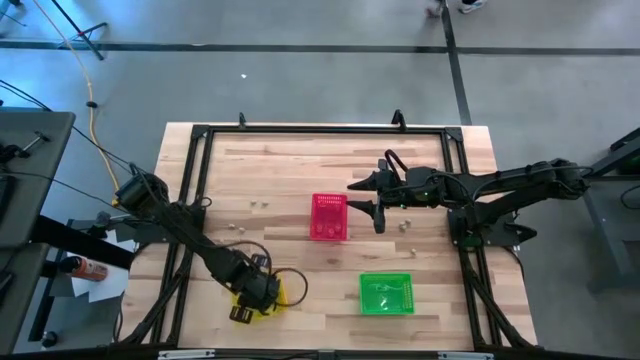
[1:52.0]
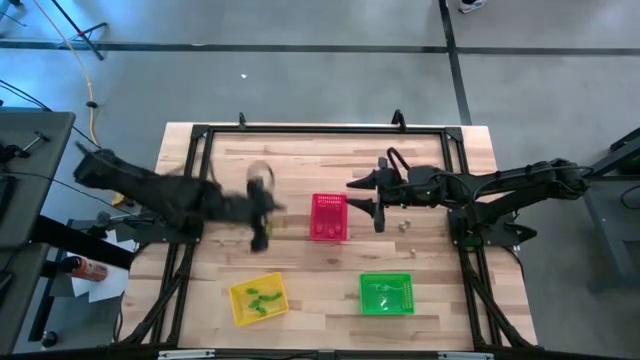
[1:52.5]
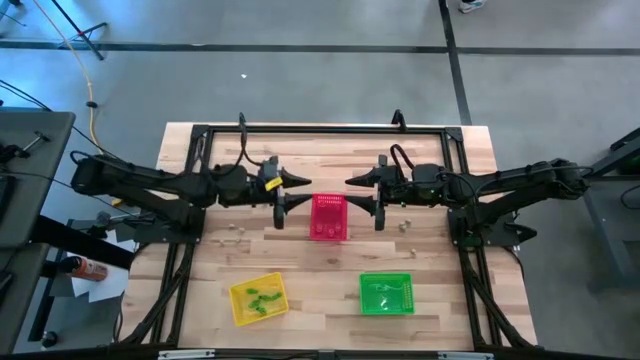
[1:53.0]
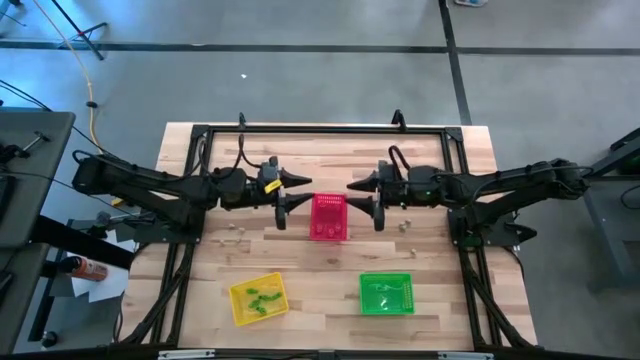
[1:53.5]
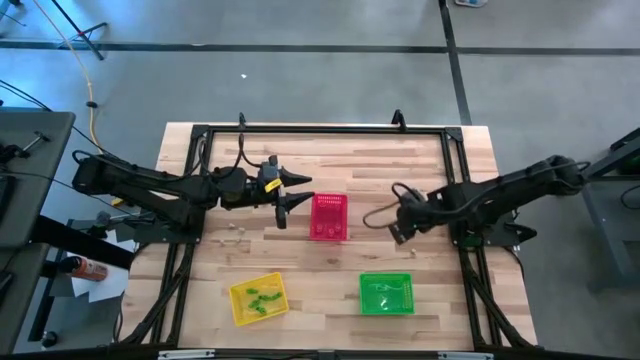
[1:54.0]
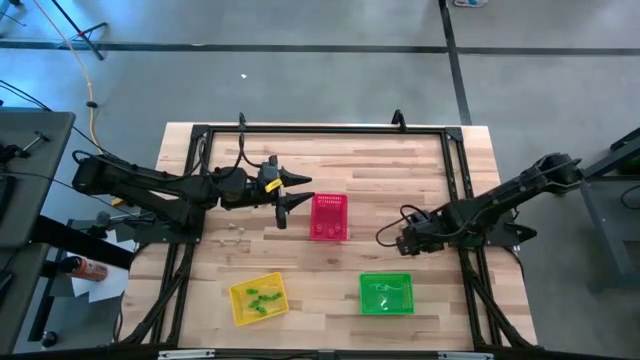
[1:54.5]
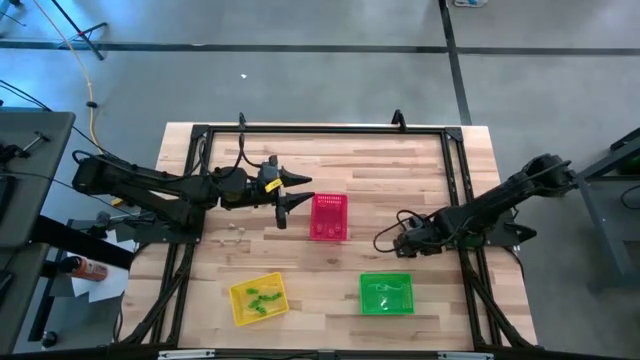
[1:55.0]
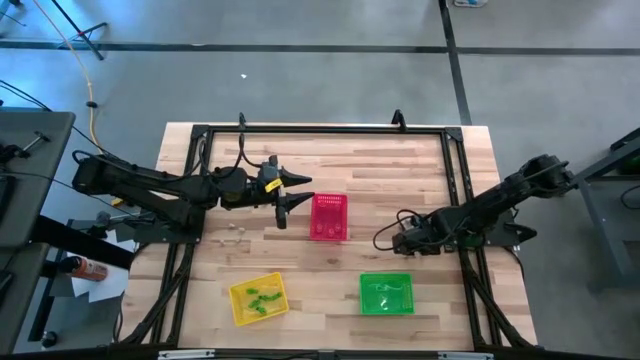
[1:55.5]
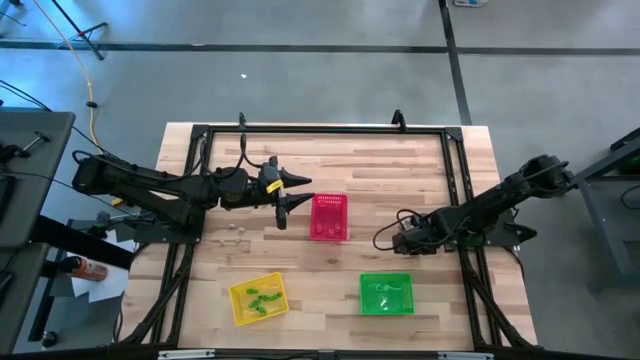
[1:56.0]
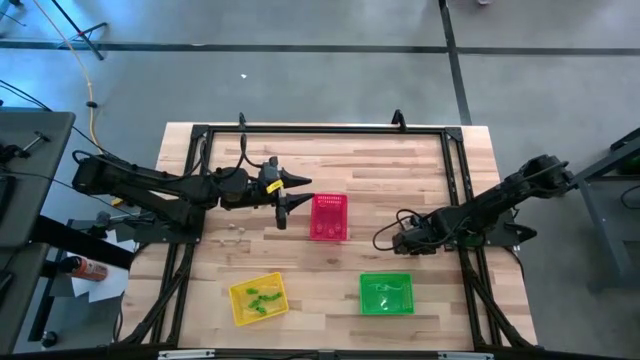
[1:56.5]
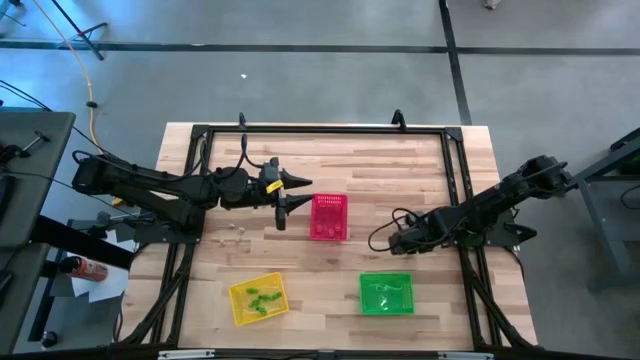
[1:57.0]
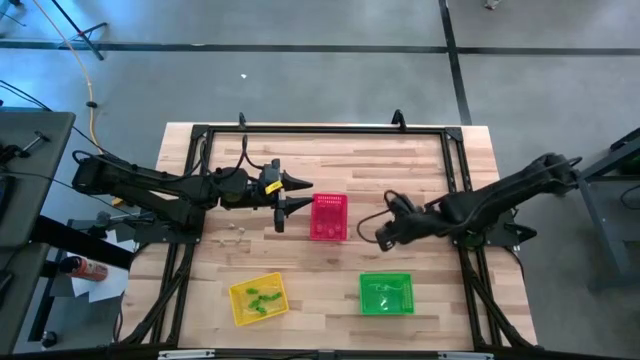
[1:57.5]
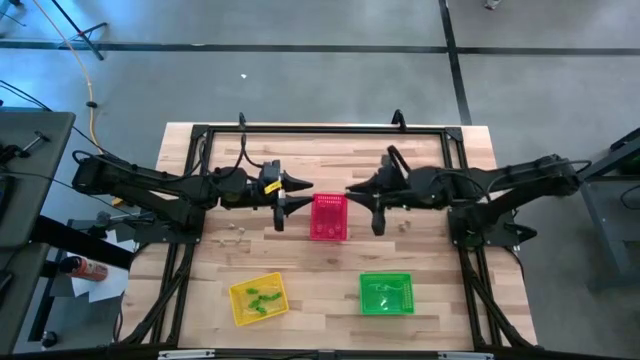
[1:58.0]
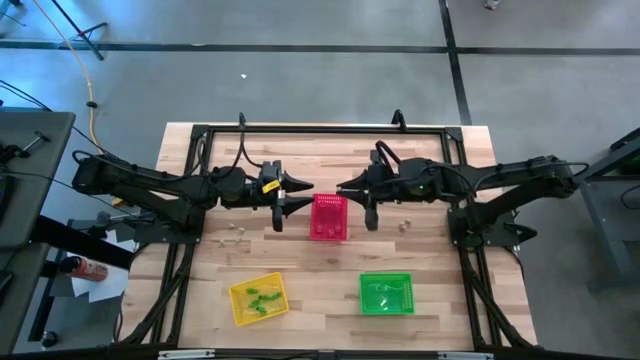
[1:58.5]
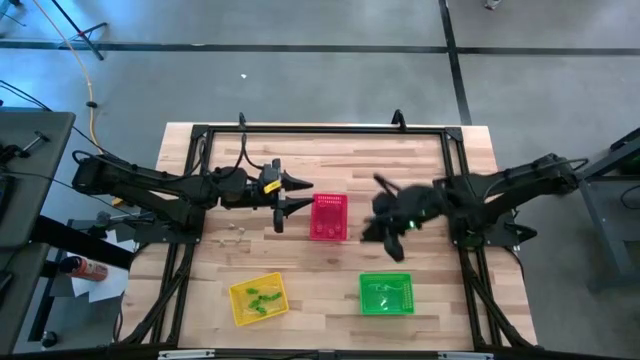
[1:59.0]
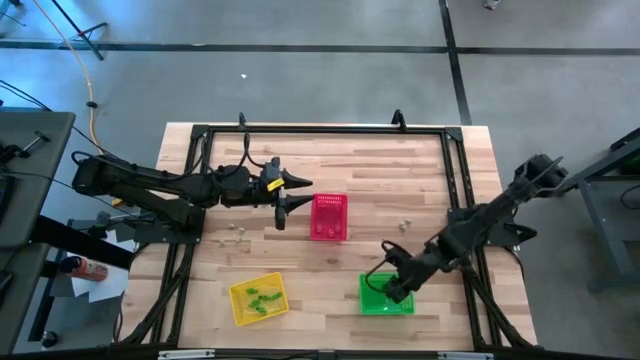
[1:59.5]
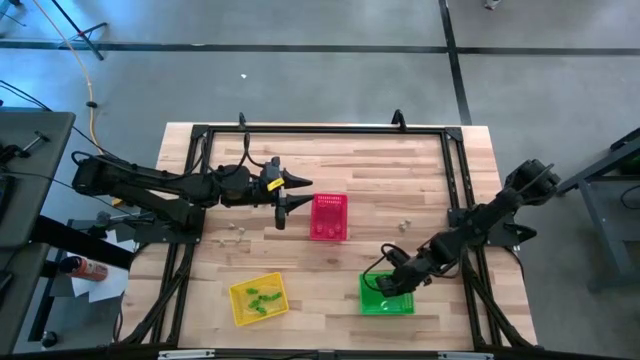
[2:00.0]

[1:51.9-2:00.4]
Task: Sort Halloween decoration
Put the white skull toy into the green bin

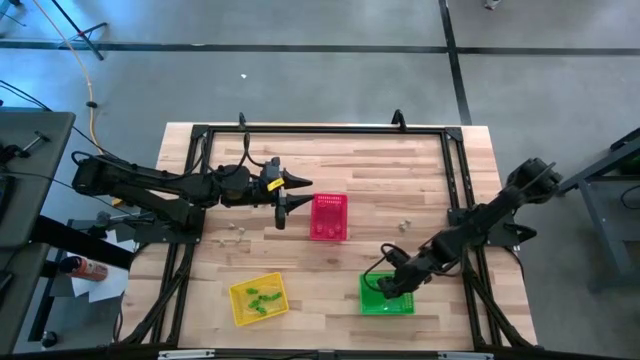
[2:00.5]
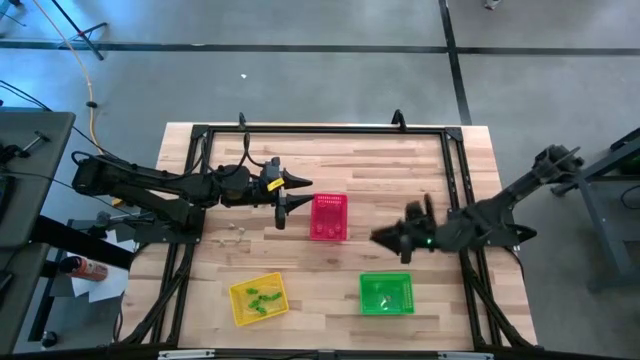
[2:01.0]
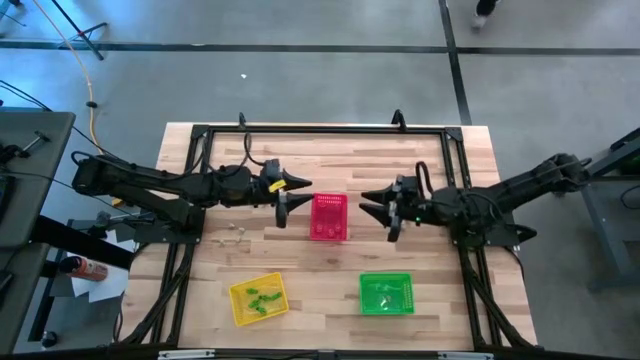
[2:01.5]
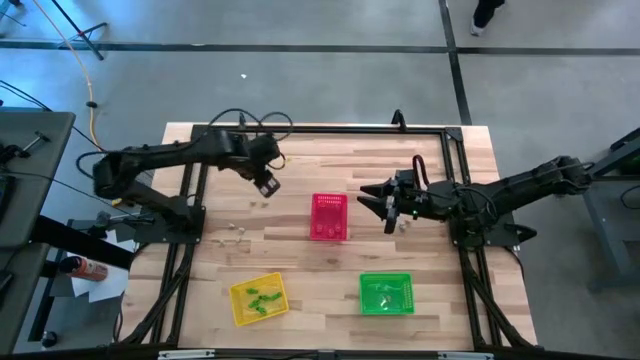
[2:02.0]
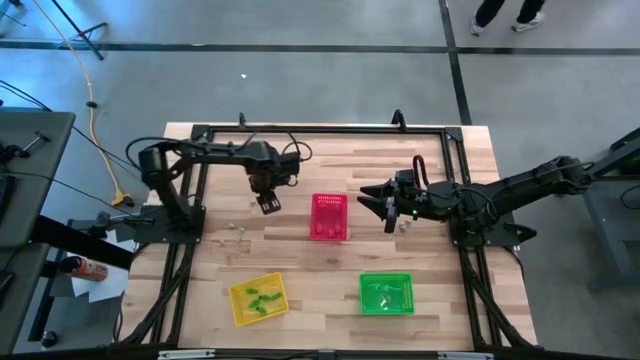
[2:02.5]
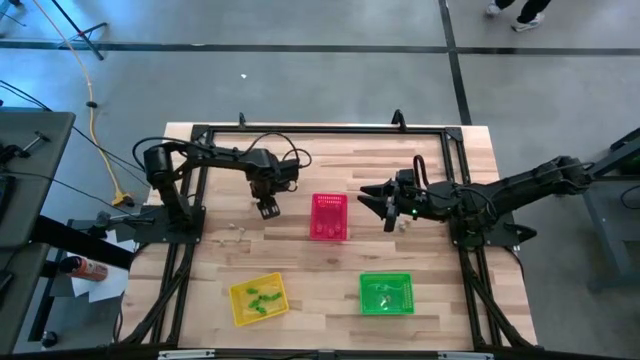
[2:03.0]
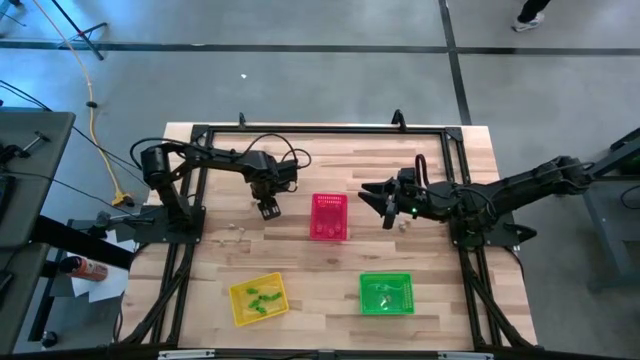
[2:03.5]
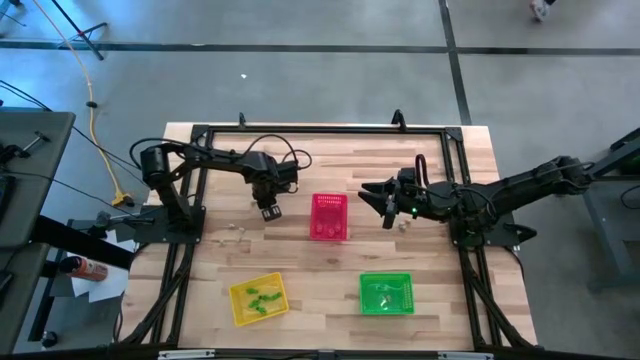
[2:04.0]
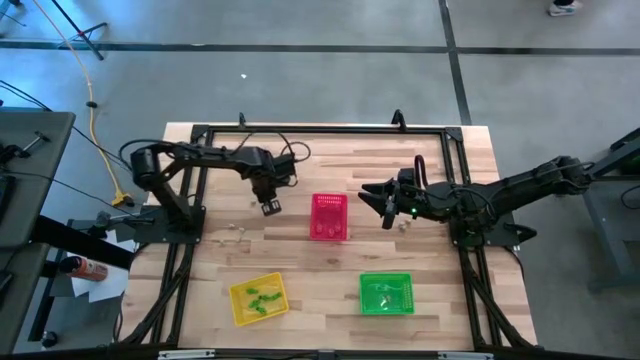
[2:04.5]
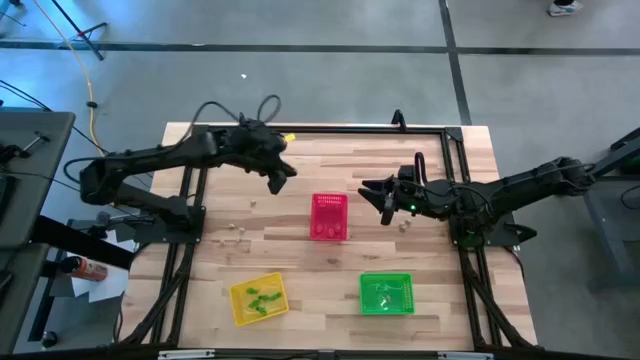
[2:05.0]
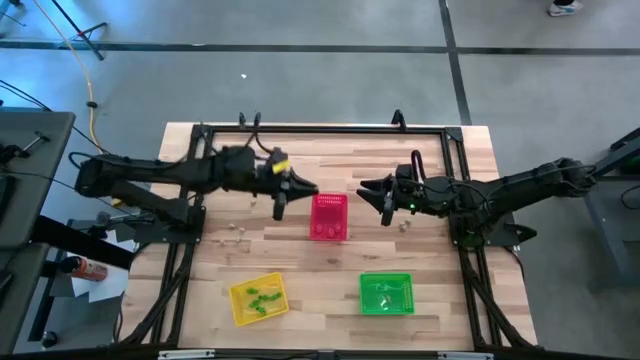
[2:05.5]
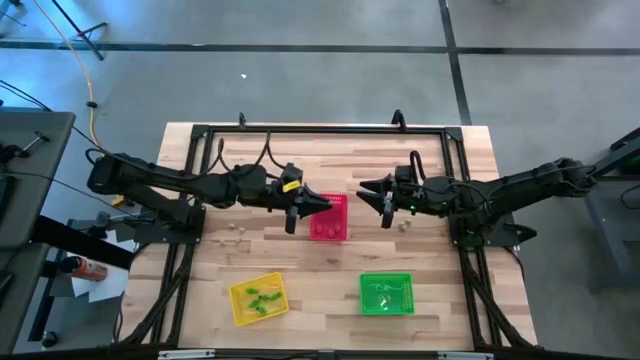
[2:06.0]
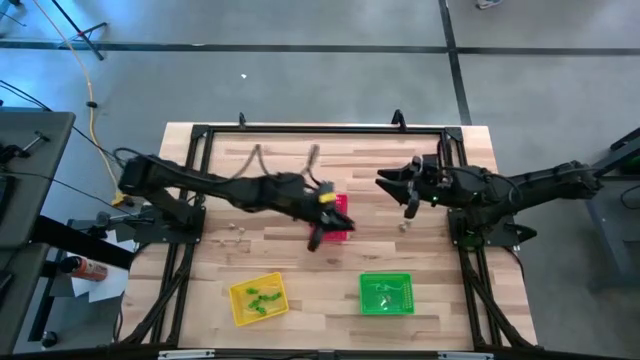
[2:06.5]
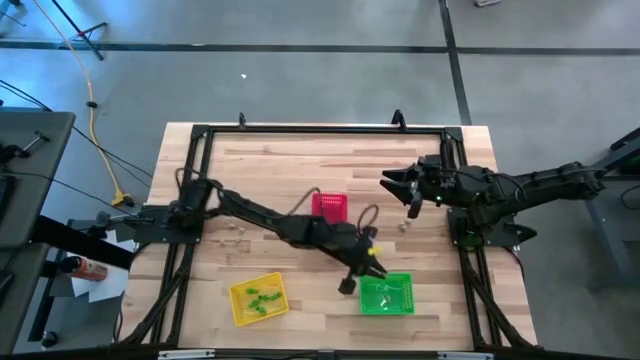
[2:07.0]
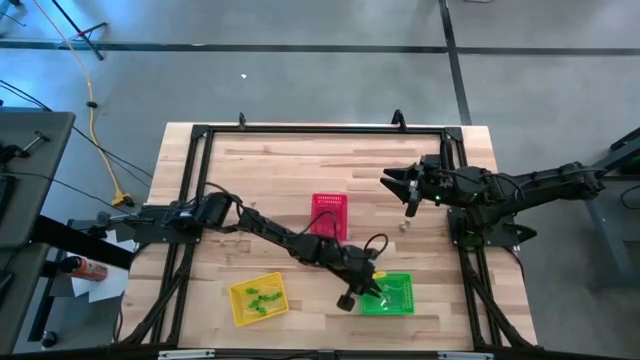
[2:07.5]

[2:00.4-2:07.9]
Put the white skull toy into the green bin

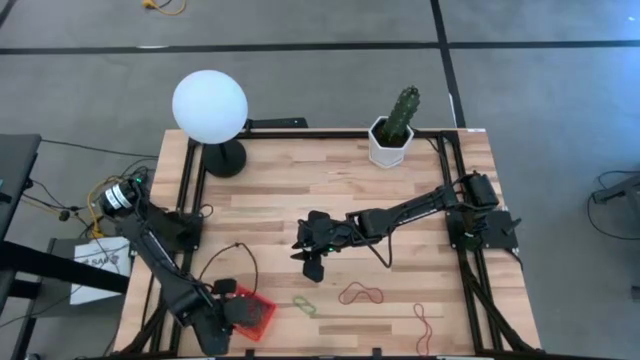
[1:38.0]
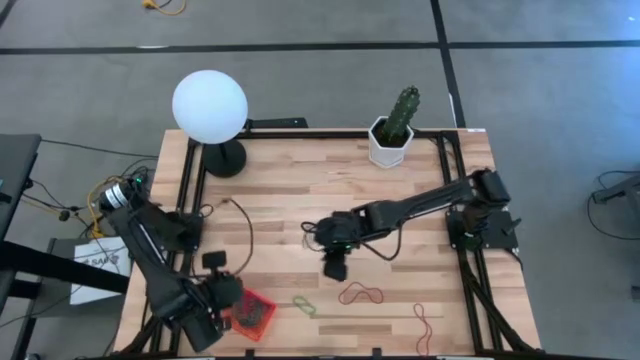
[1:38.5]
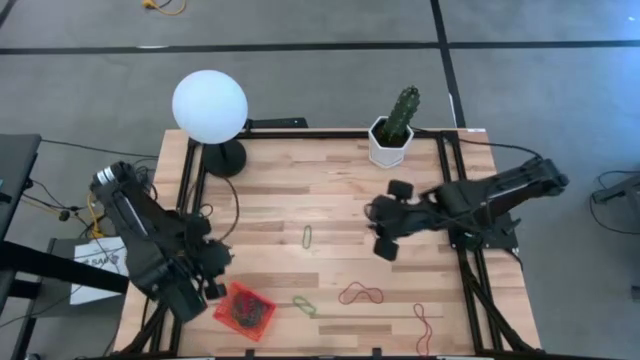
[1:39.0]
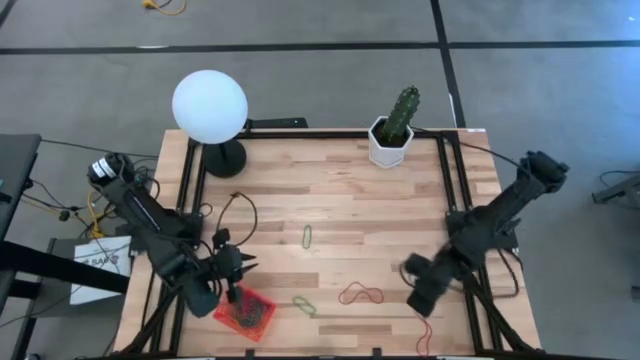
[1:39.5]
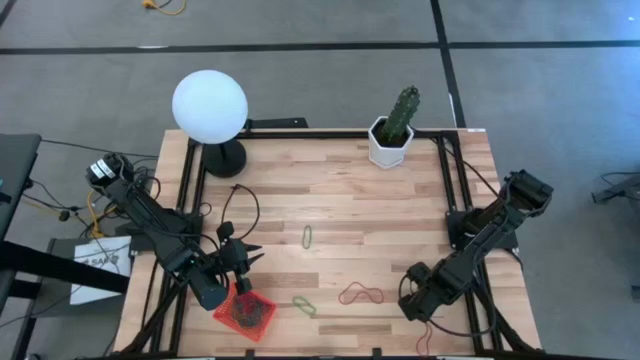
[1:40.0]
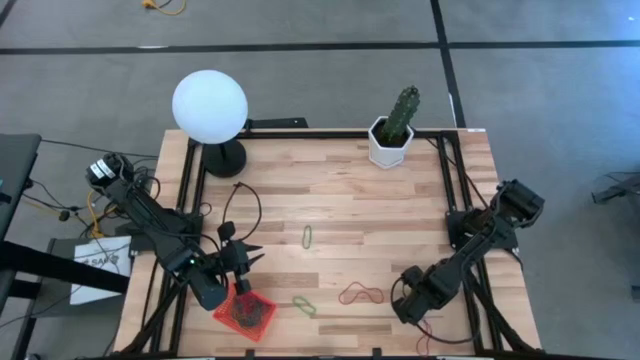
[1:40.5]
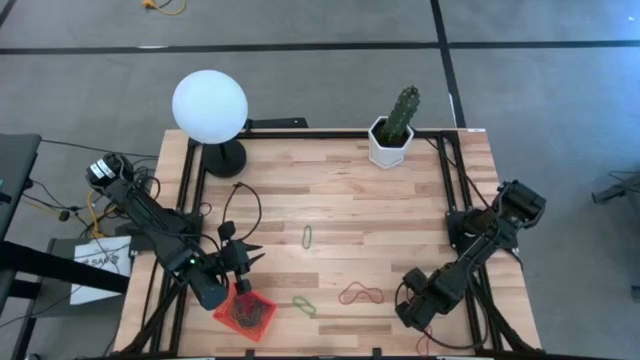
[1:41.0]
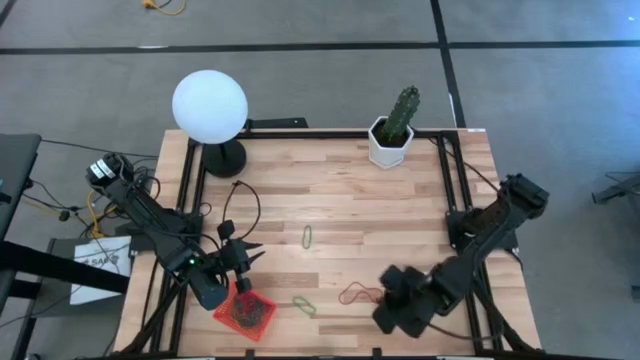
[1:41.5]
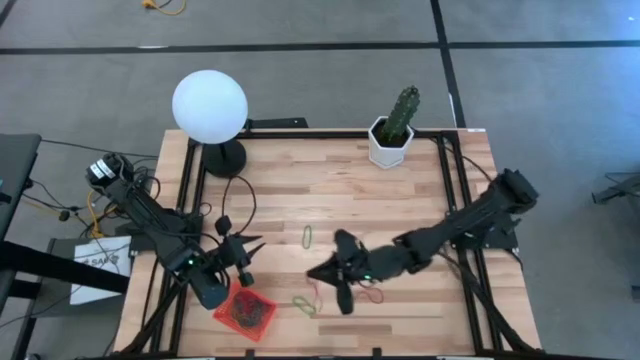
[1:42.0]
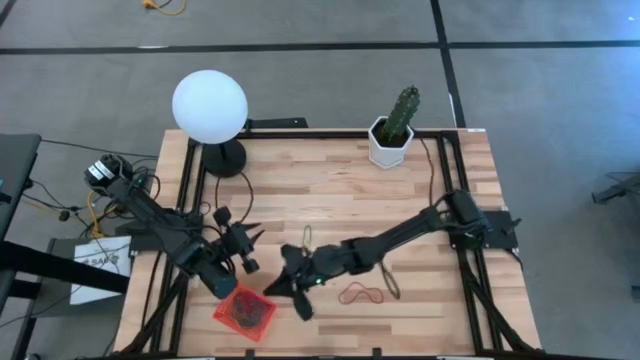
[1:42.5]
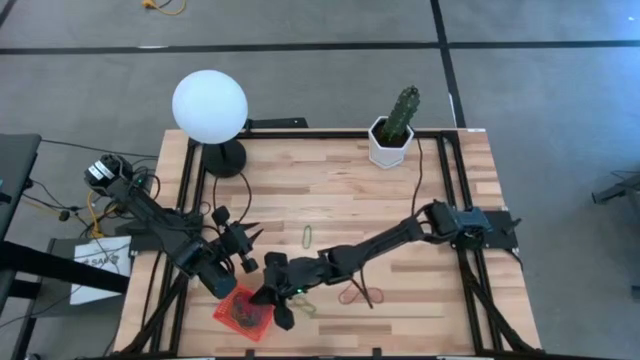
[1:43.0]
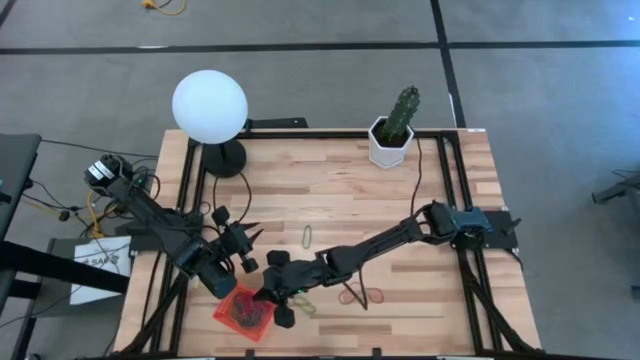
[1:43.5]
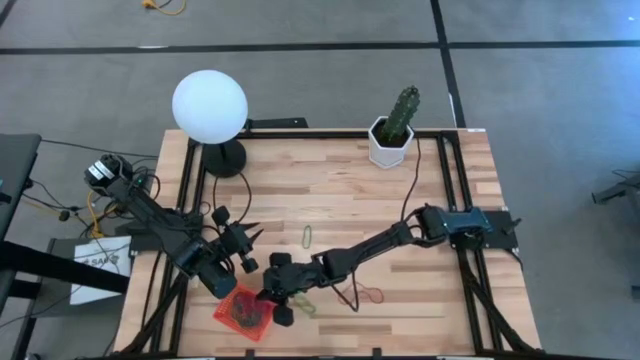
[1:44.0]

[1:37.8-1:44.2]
Task: Pick and place rubber bands into bin
Put the bottom red rubber band into the basket
